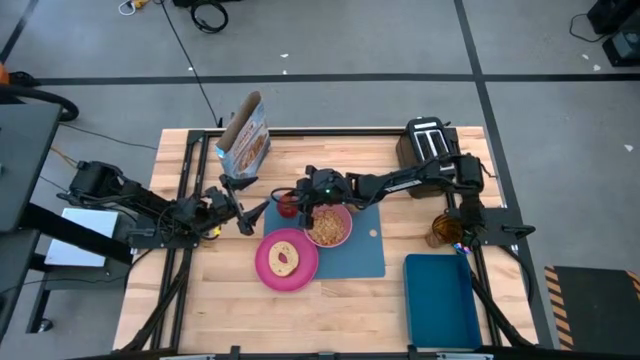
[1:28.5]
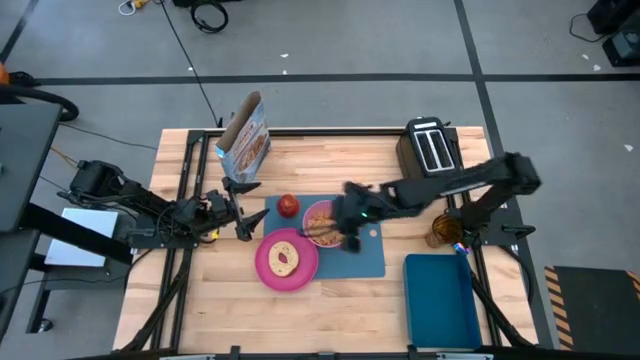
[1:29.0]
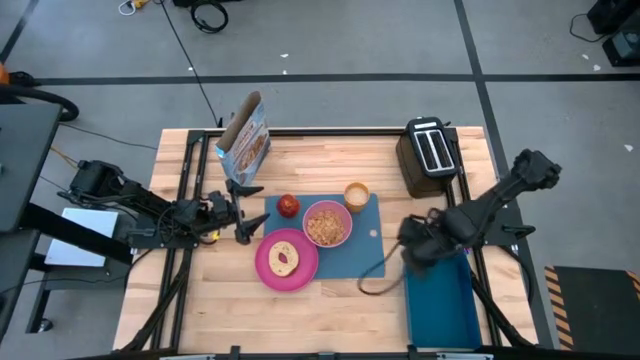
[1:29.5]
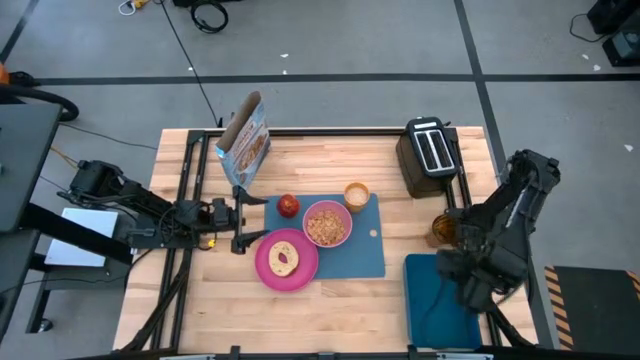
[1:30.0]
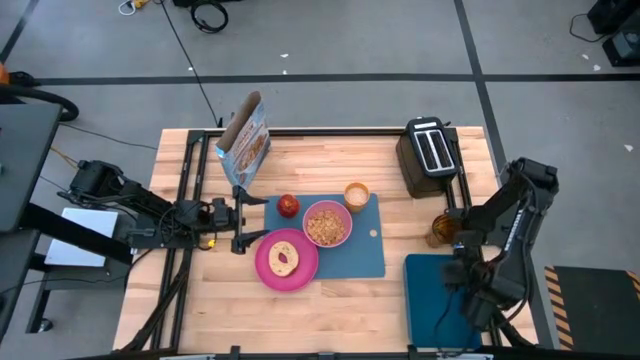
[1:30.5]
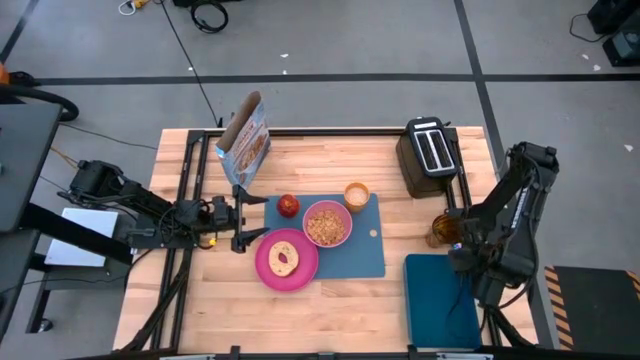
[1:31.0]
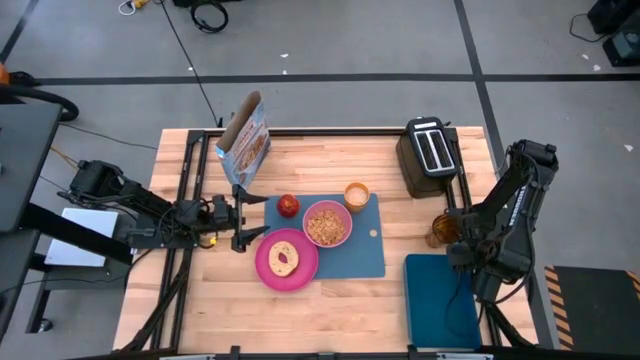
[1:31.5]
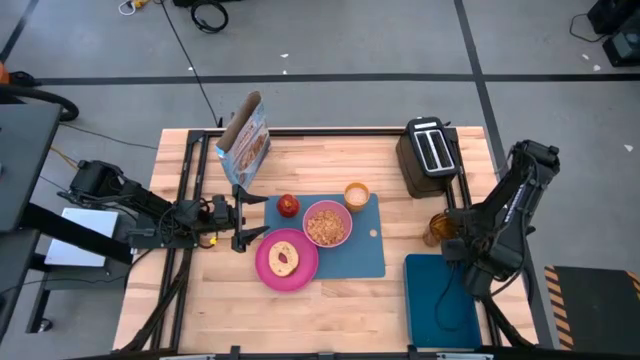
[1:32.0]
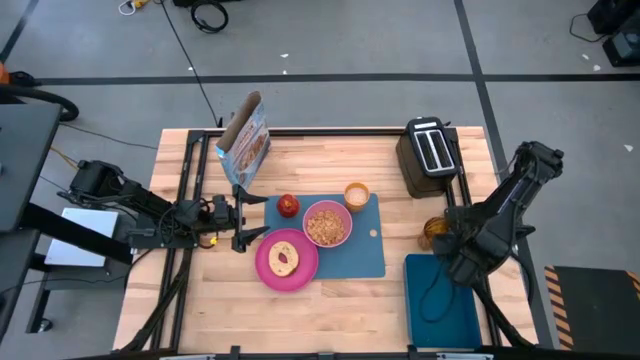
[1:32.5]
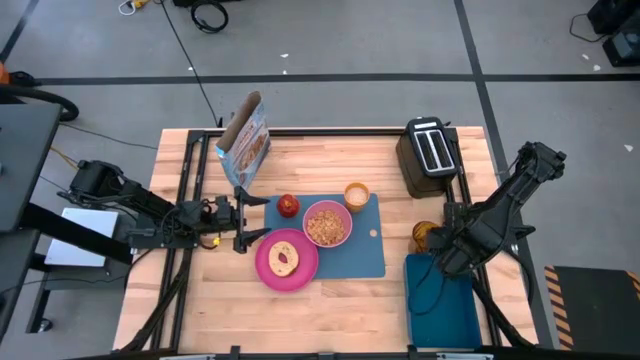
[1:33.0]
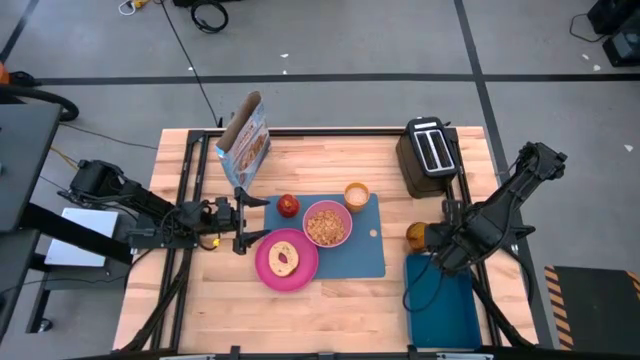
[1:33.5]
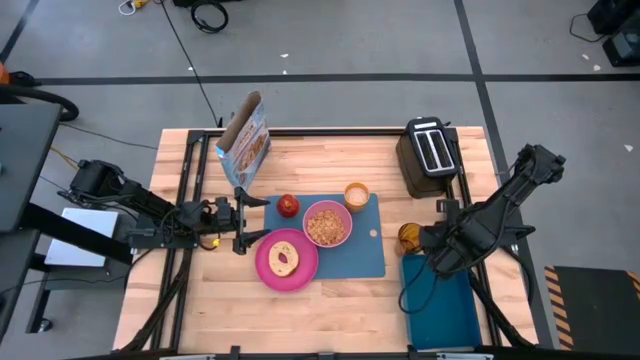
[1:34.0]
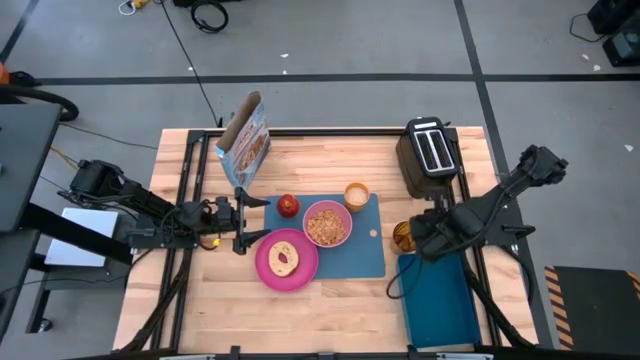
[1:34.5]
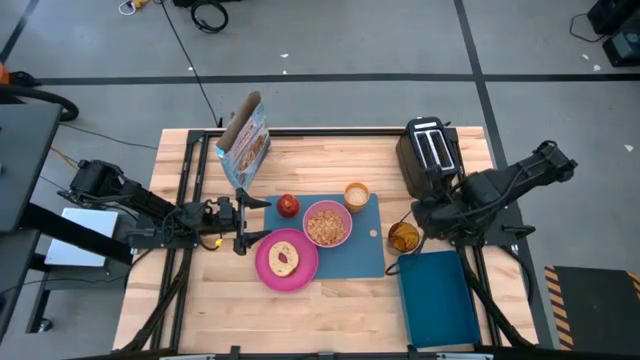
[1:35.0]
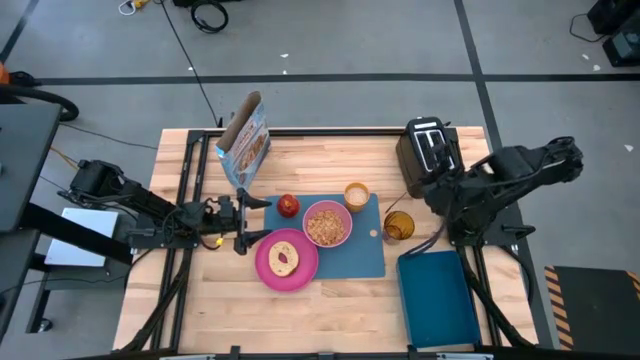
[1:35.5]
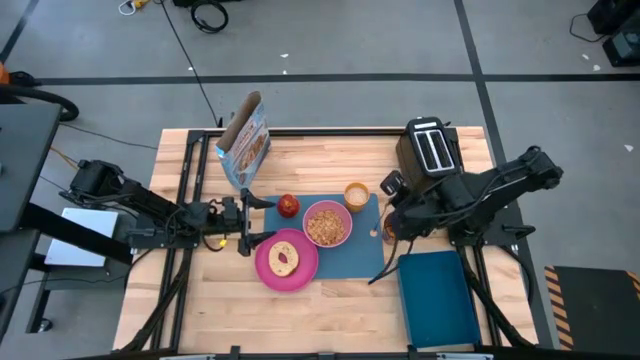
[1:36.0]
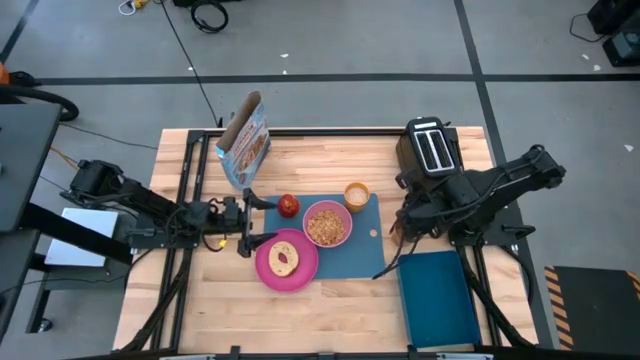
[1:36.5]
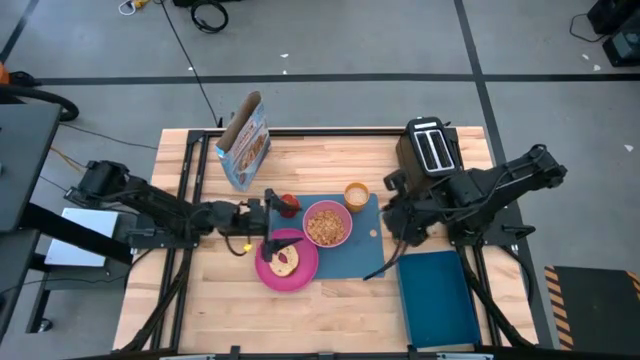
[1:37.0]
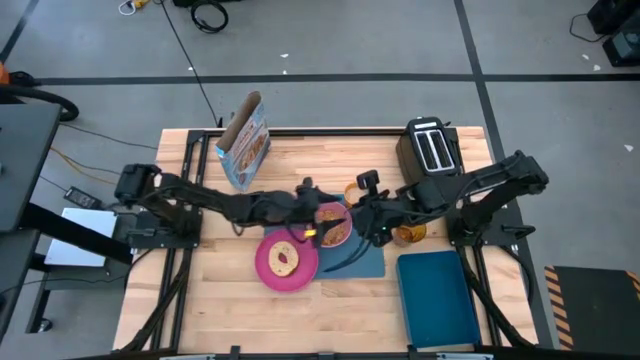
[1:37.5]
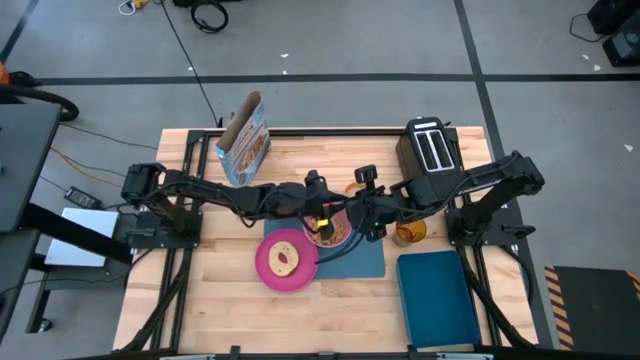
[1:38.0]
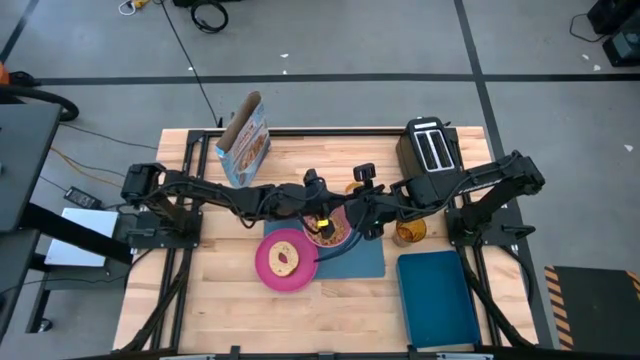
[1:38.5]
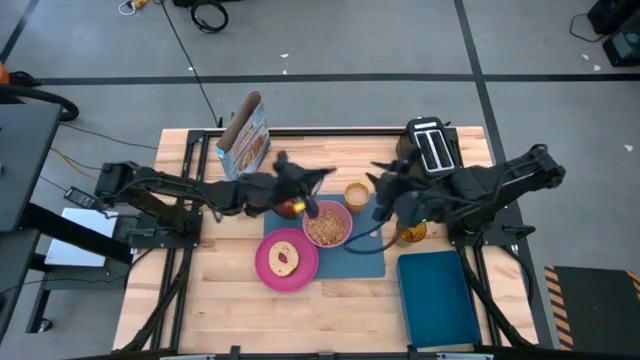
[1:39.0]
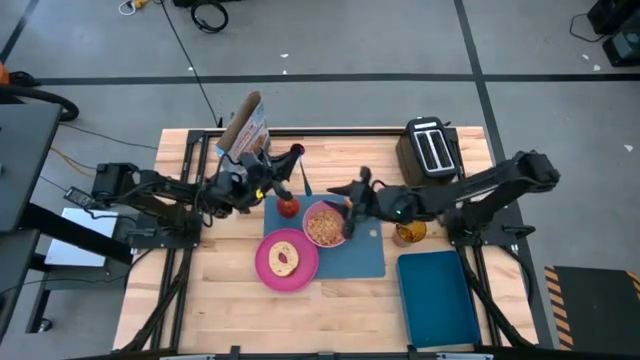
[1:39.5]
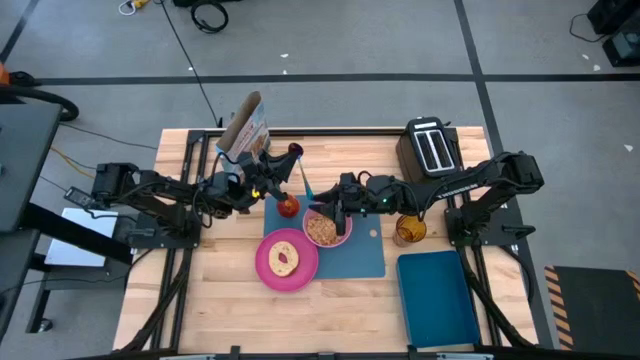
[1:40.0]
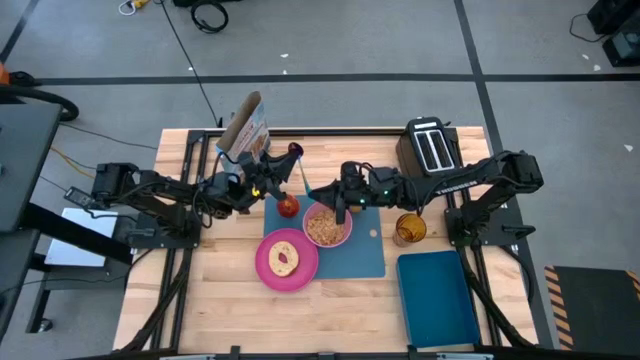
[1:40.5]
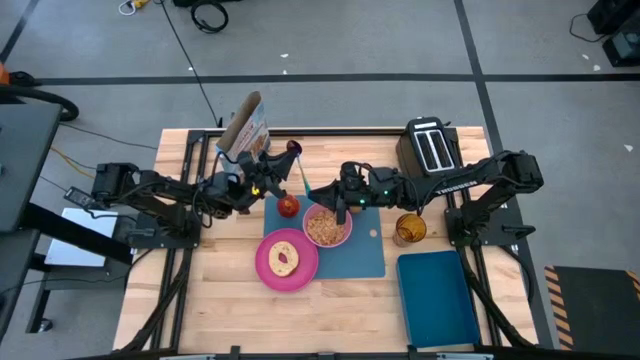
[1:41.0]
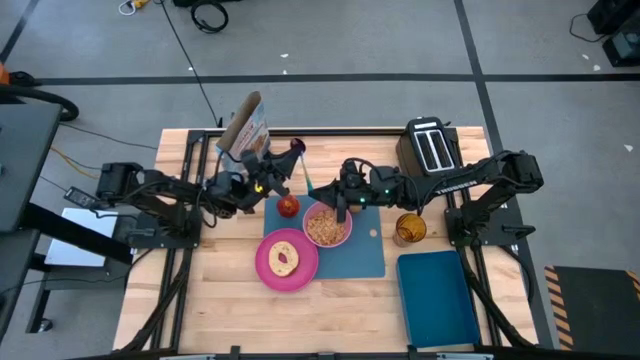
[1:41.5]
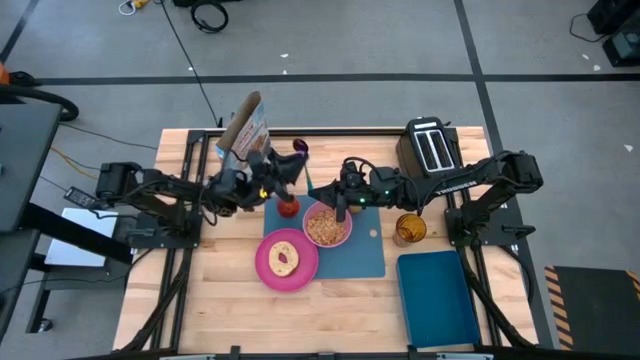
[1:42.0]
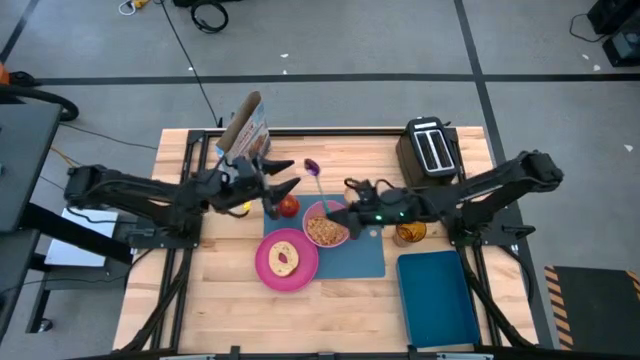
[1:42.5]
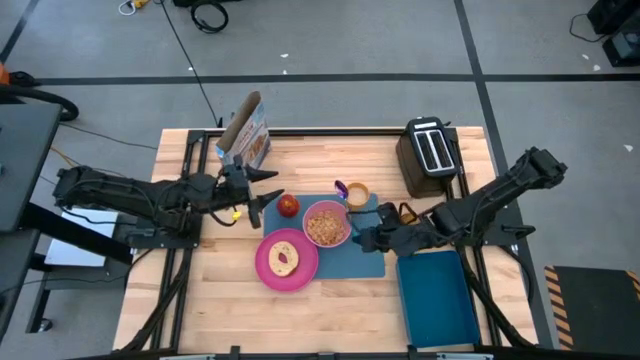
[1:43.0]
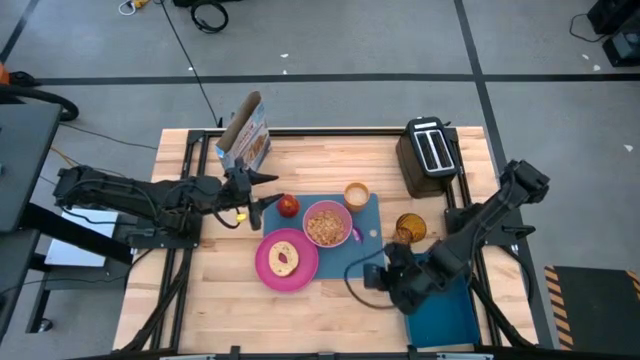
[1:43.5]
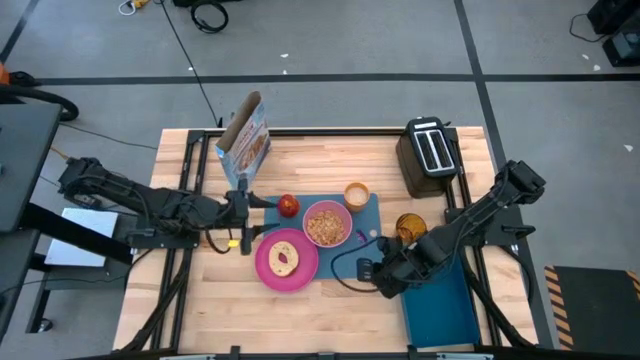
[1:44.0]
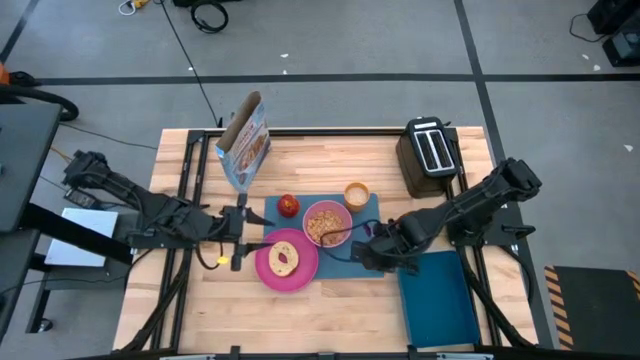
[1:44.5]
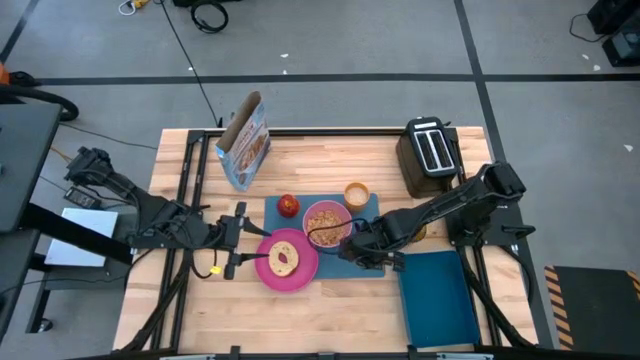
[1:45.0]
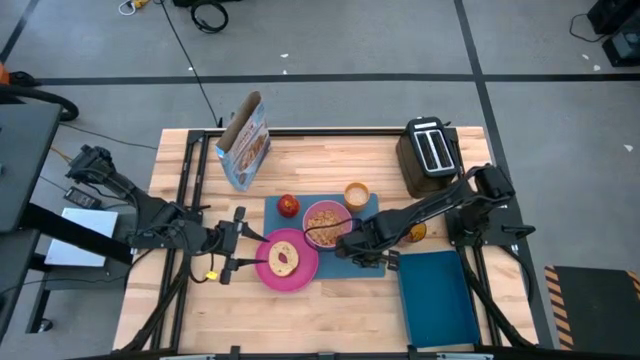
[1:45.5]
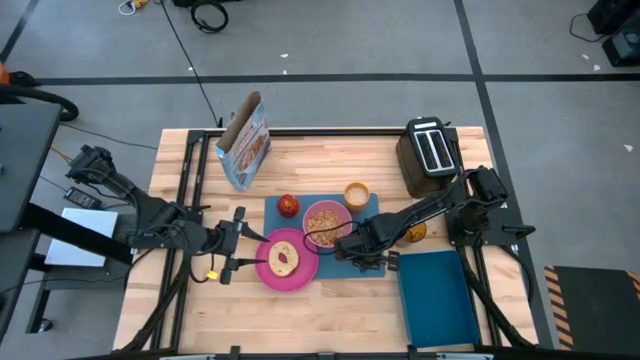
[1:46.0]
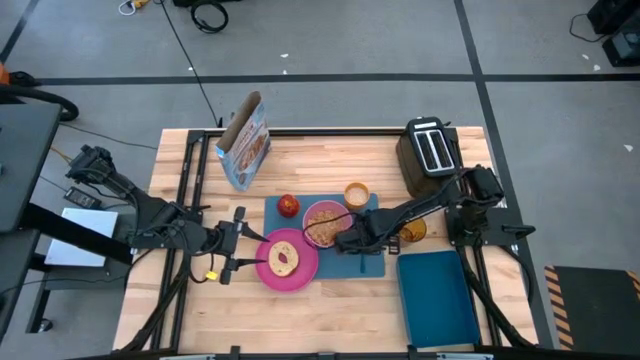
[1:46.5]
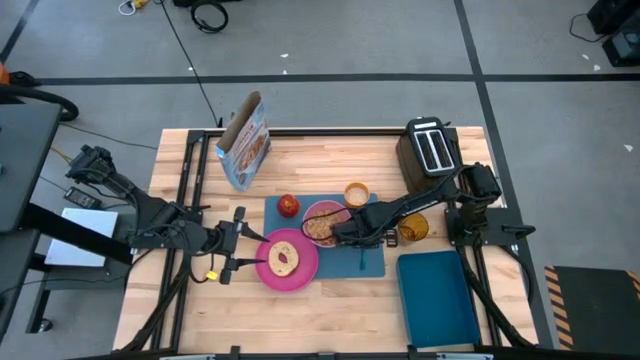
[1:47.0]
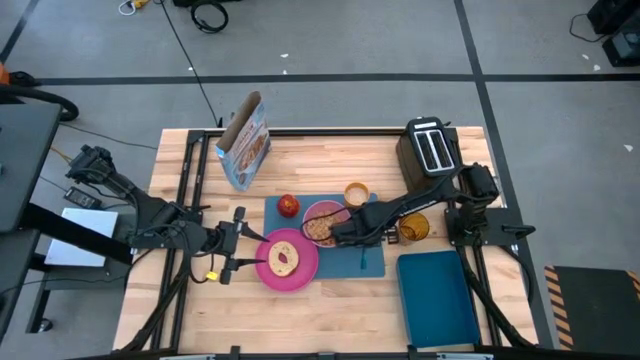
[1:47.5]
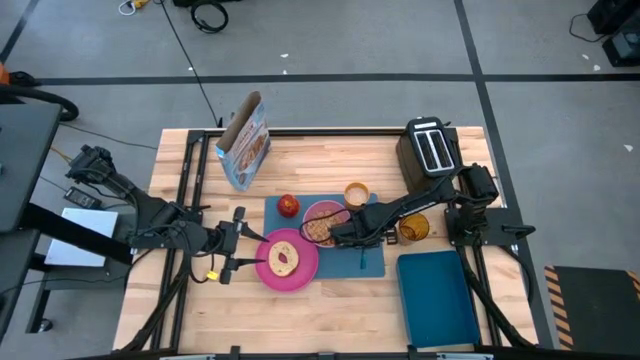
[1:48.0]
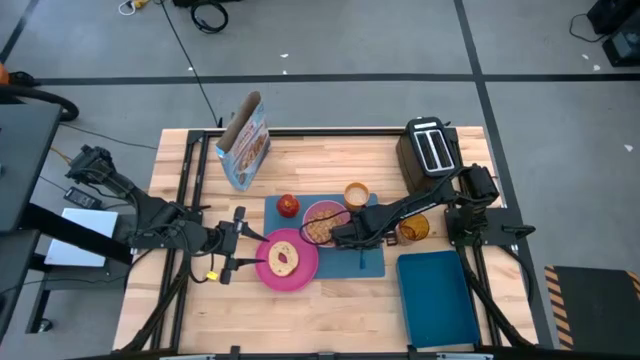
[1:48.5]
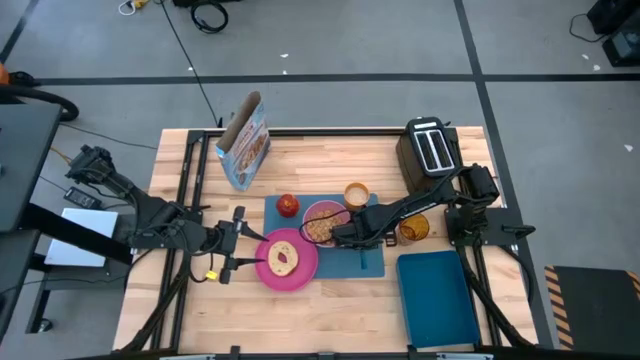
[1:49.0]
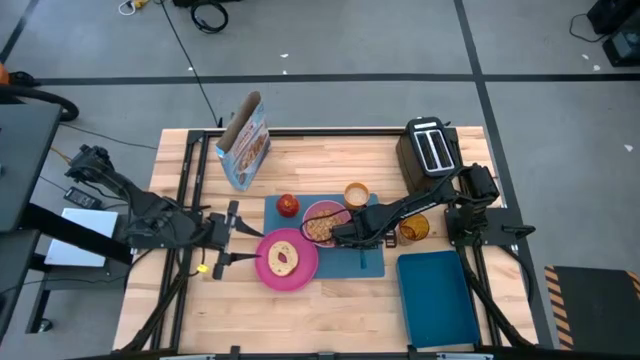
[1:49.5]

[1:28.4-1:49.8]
Task: Arrange a breakfast setting
Put the purple spoon on the blue placemat to the left of the pink bowl
